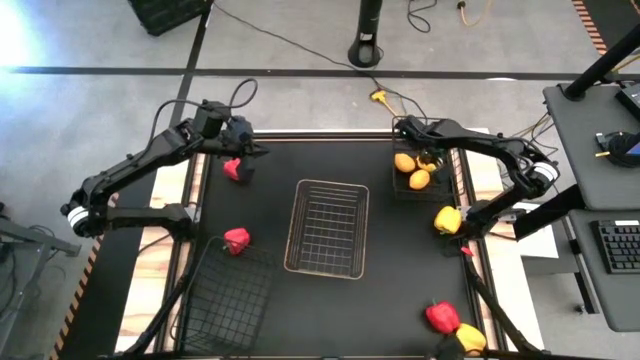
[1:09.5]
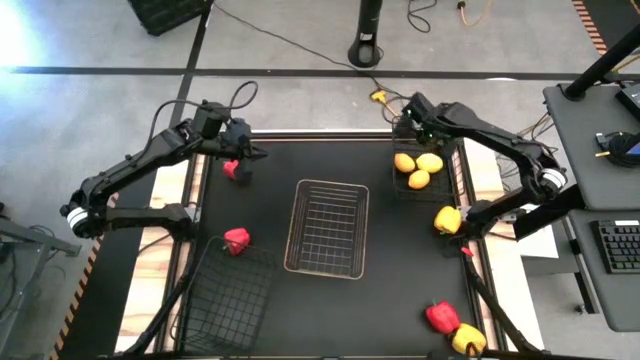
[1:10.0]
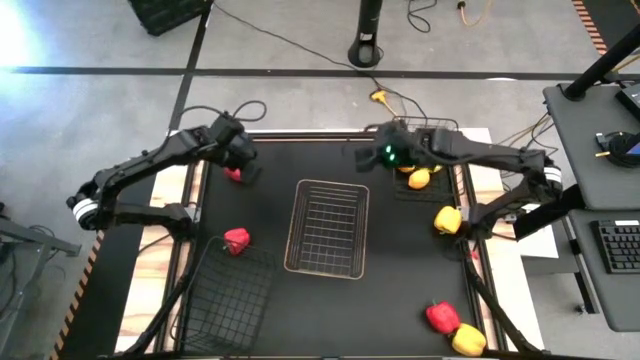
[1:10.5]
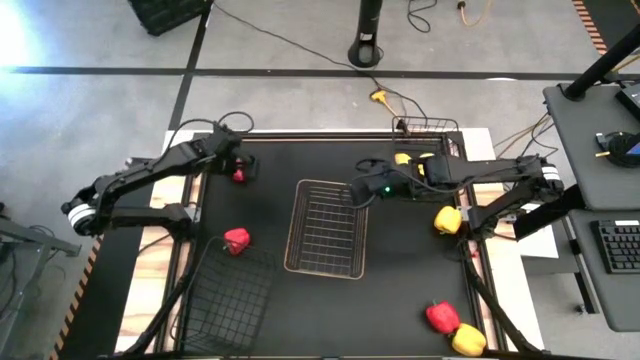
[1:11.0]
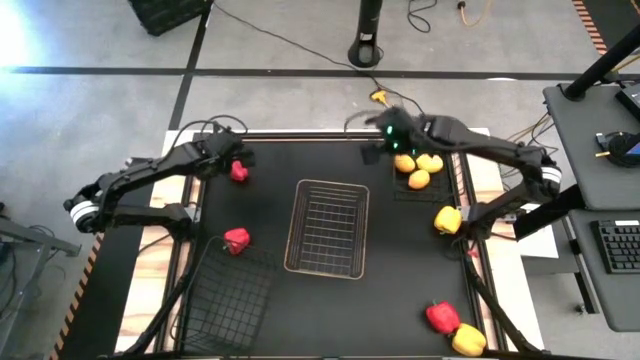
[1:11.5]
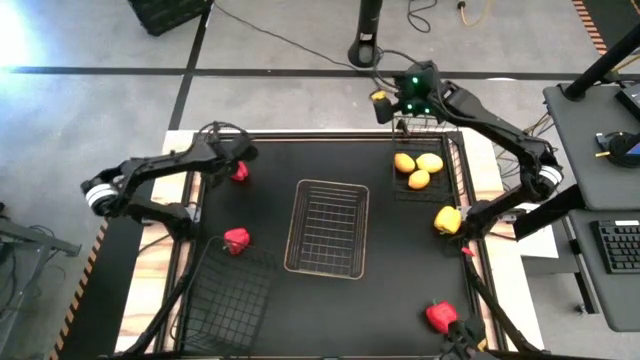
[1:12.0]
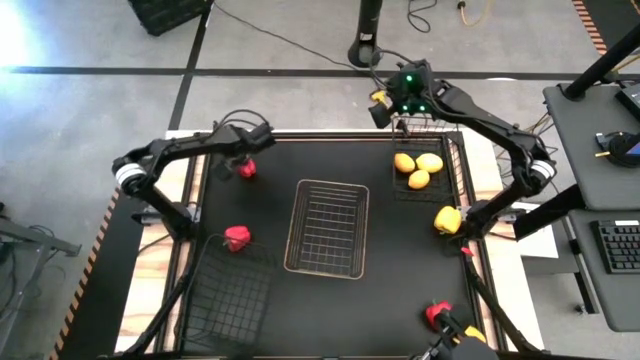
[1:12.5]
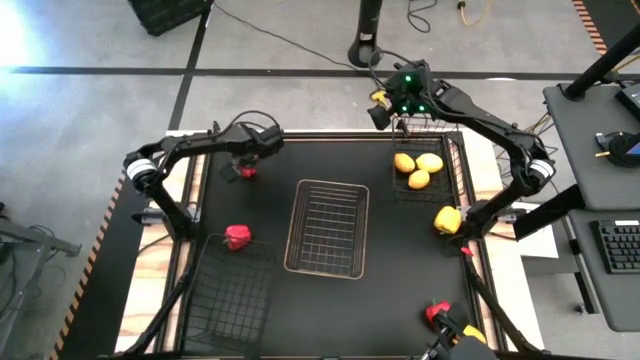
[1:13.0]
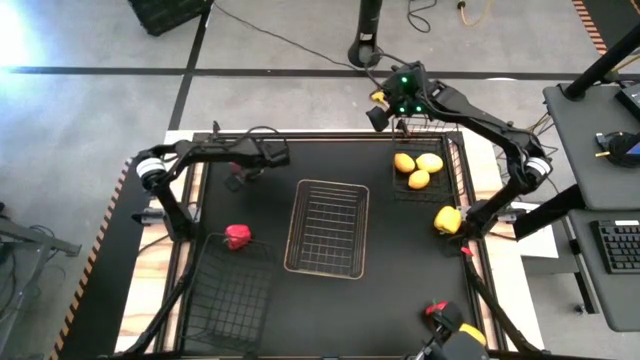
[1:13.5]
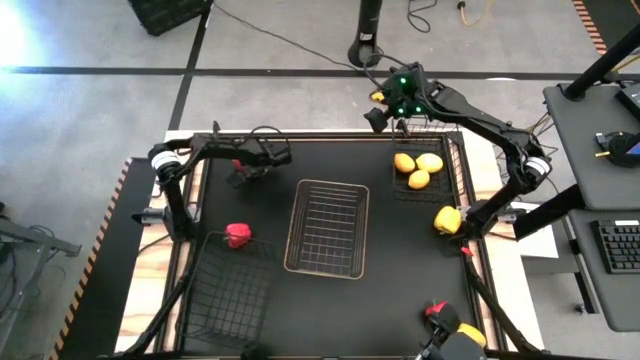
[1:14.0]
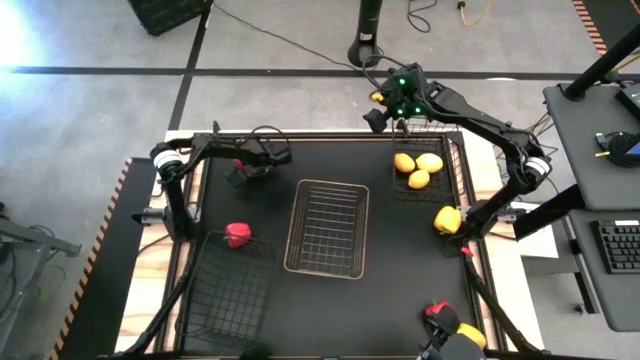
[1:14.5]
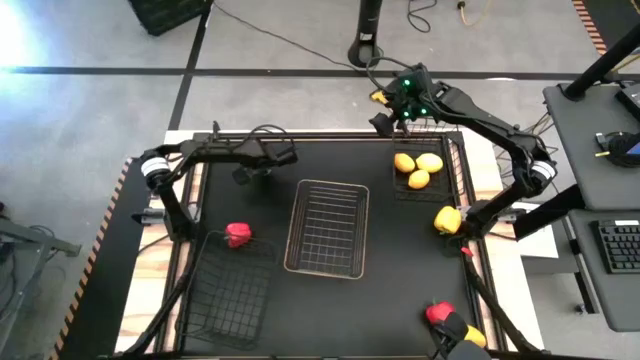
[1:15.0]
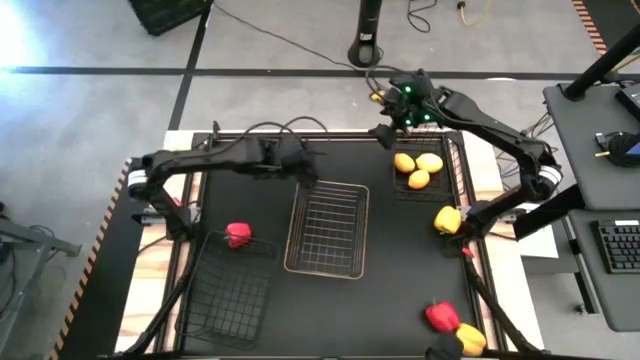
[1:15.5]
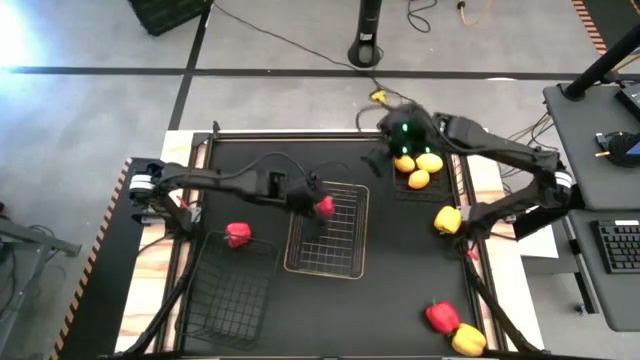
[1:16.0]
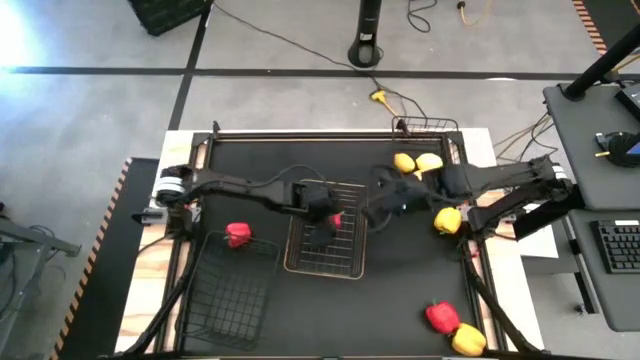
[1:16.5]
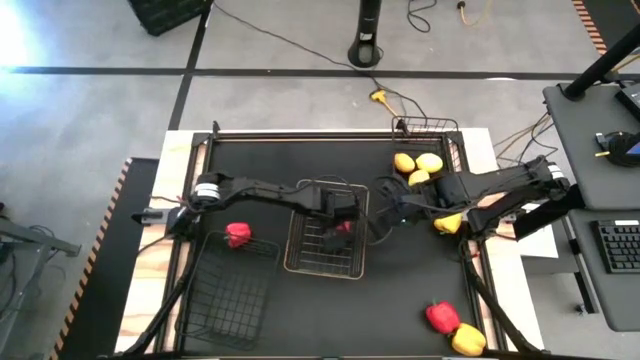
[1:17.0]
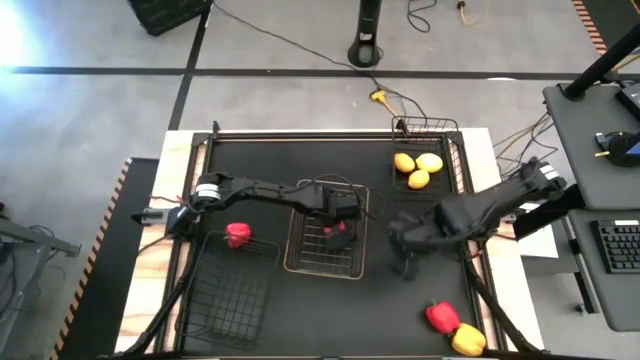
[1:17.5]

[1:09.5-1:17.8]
Task: Sort produce into baskets
Put the top left red bell pepper into the yellow wire basket

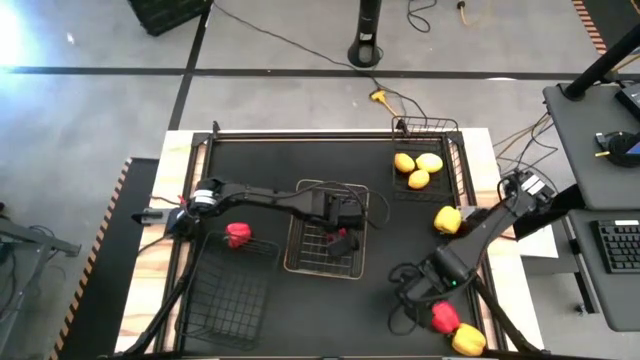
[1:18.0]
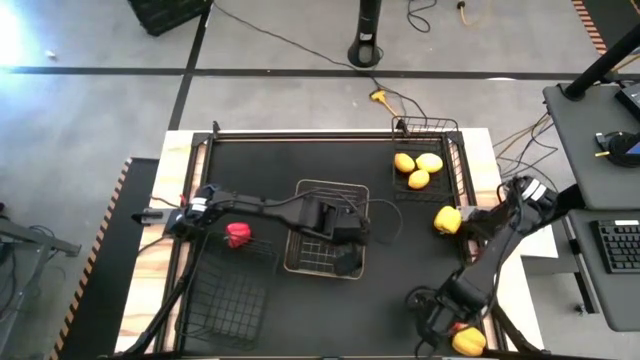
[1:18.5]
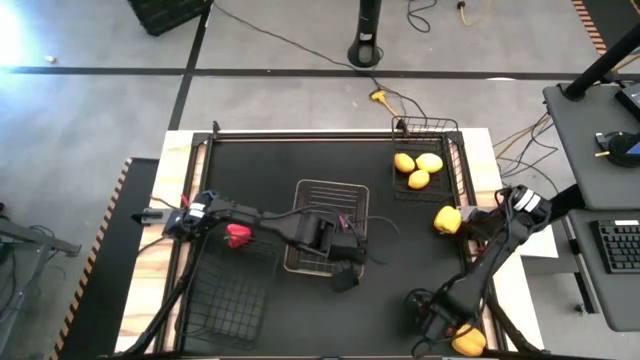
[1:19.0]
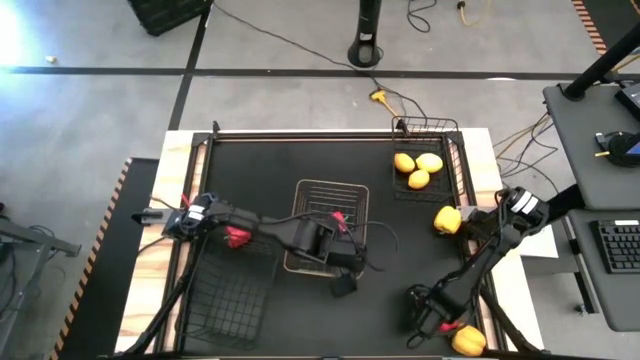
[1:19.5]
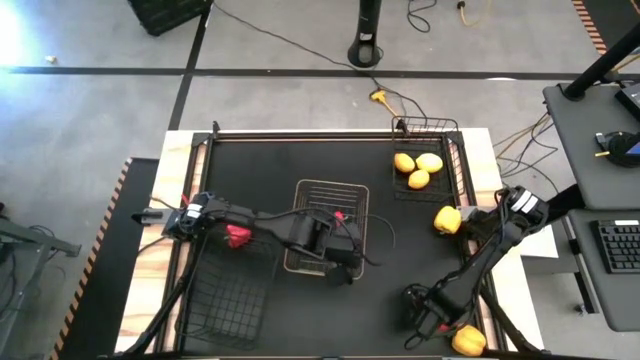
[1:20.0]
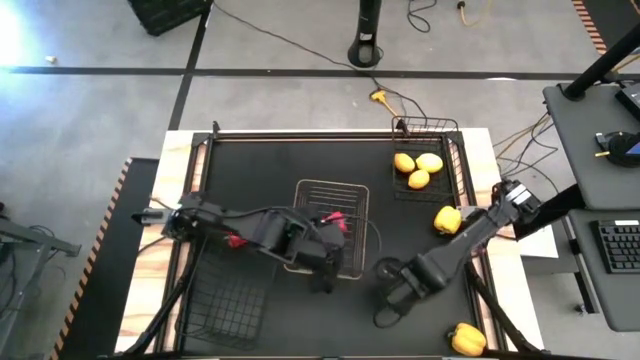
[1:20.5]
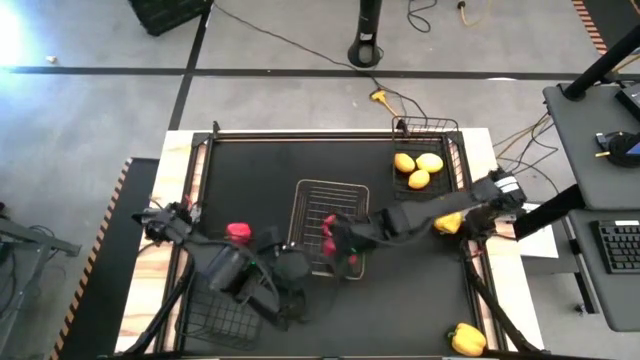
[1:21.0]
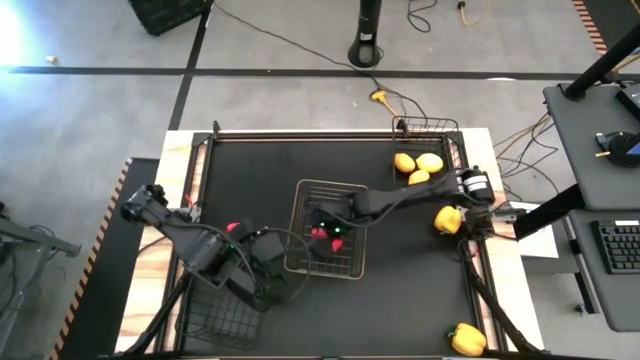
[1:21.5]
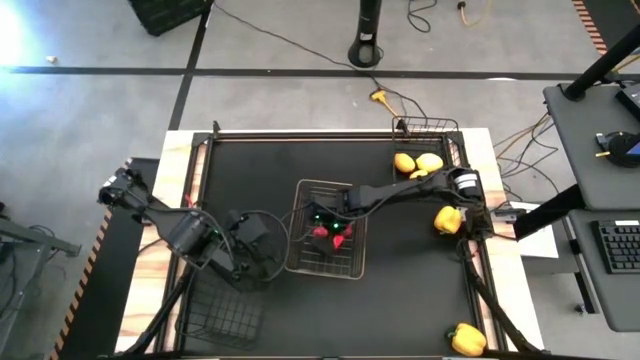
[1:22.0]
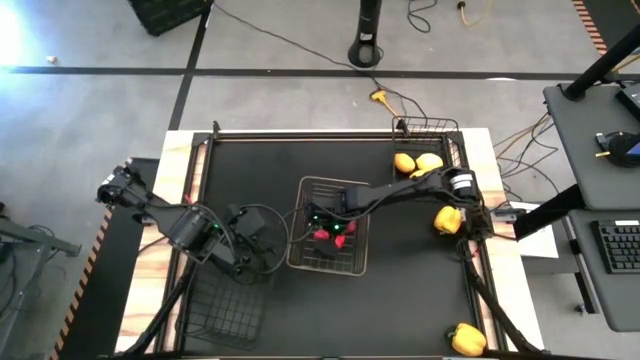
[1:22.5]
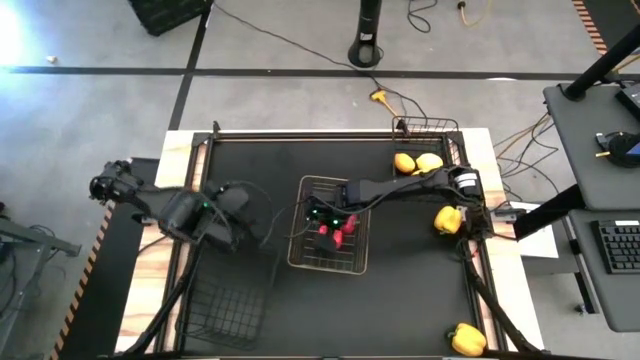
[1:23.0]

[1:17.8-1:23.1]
Put the bottom red bell pepper into the yellow wire basket

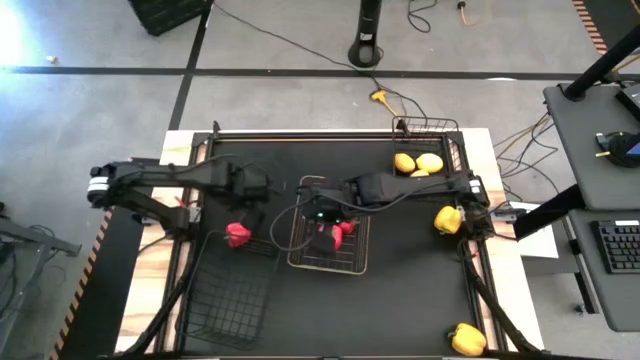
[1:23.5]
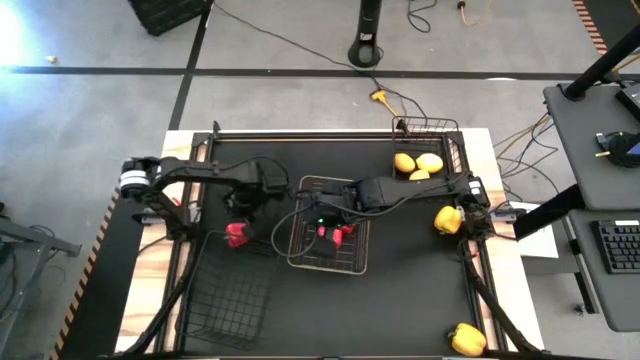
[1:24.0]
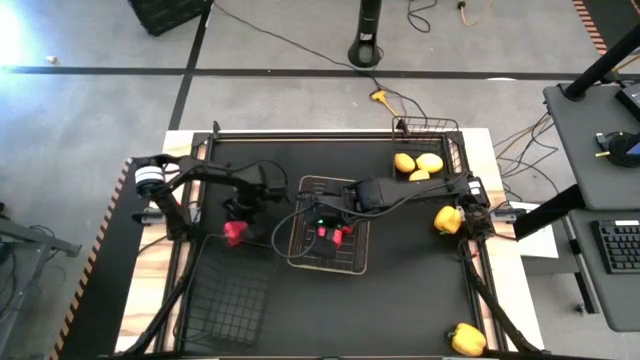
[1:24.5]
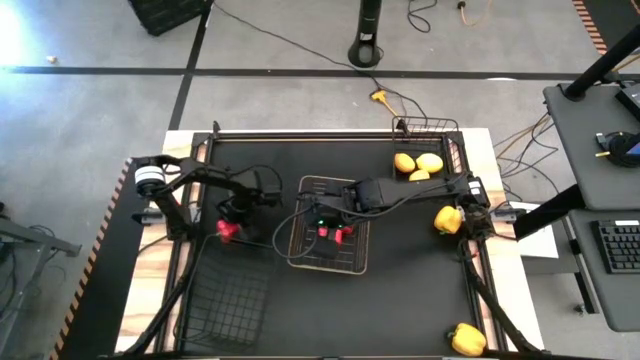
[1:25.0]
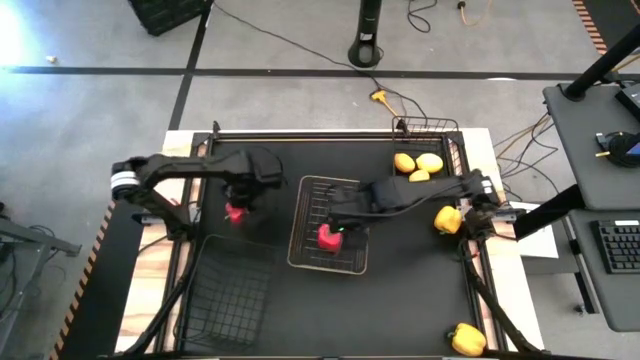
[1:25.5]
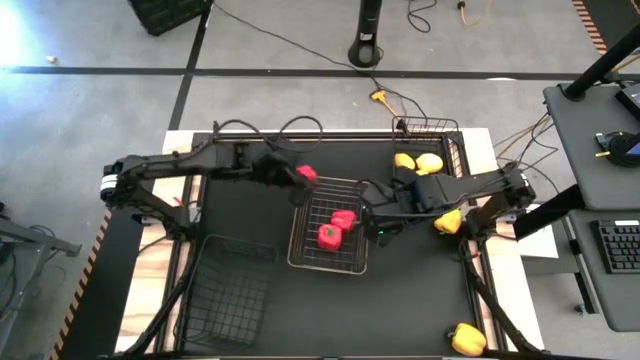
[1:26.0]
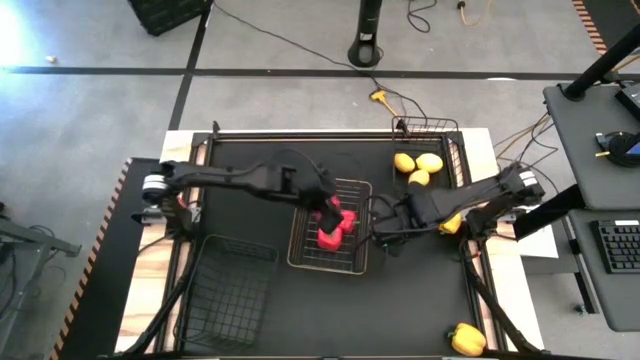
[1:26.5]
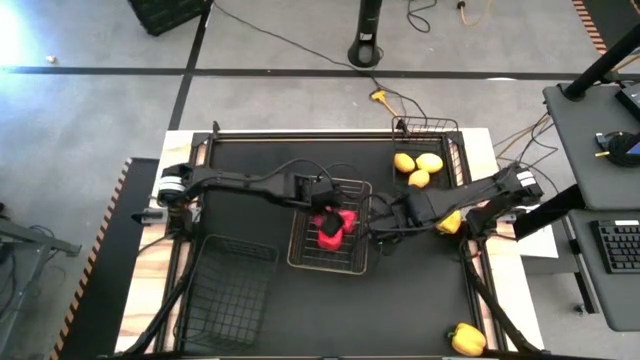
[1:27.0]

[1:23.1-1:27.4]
Put the red bell pepper into the yellow wire basket

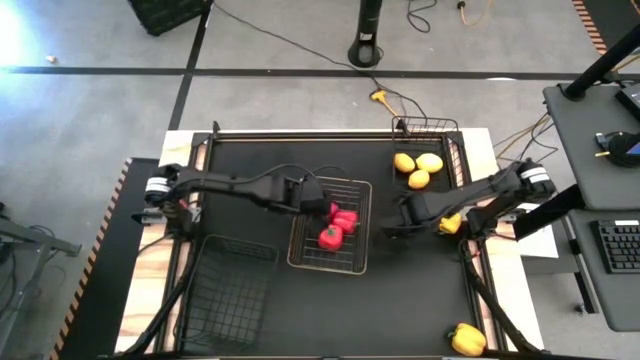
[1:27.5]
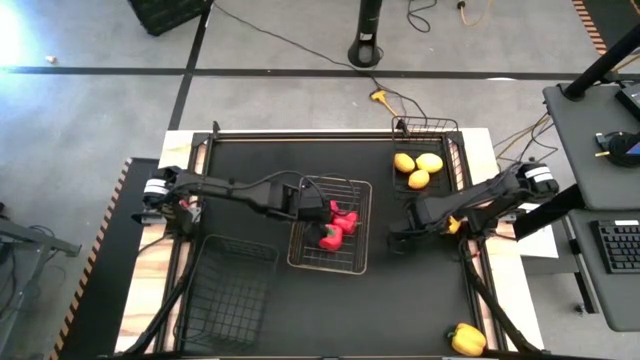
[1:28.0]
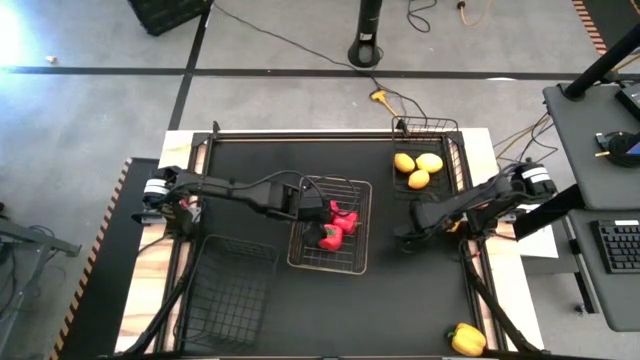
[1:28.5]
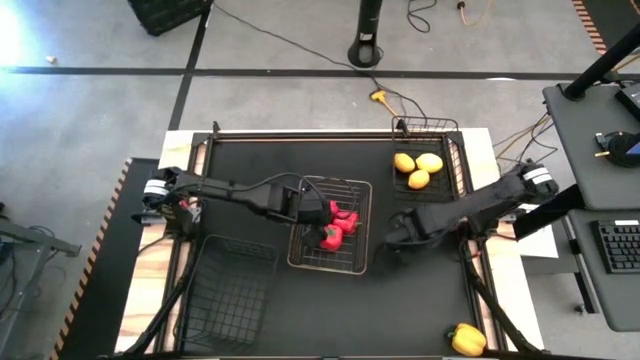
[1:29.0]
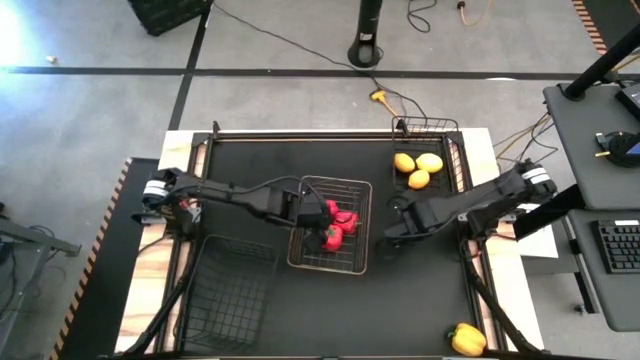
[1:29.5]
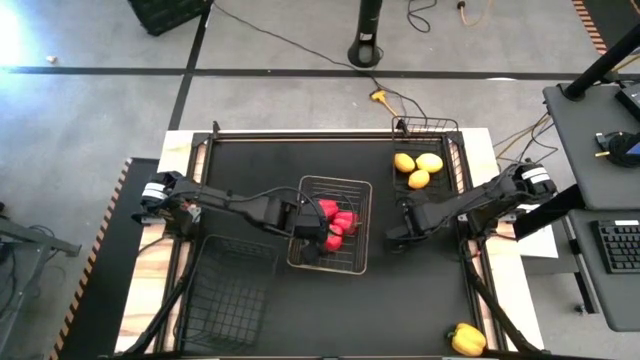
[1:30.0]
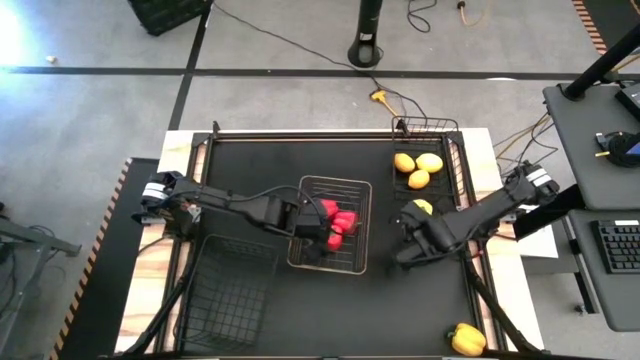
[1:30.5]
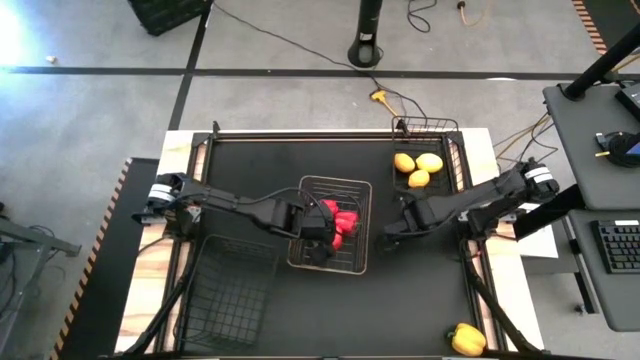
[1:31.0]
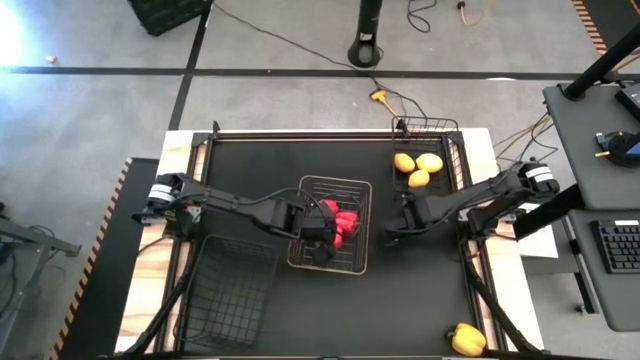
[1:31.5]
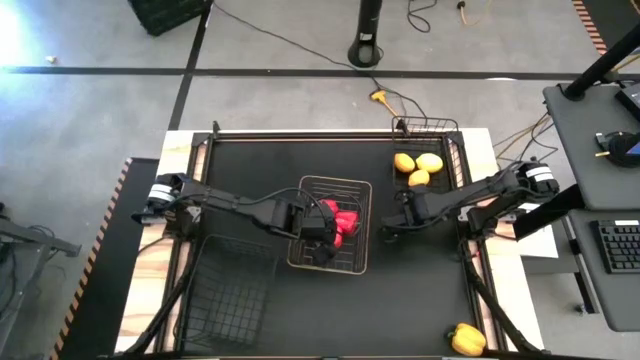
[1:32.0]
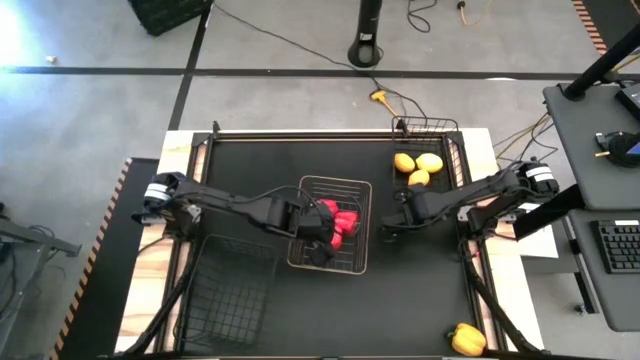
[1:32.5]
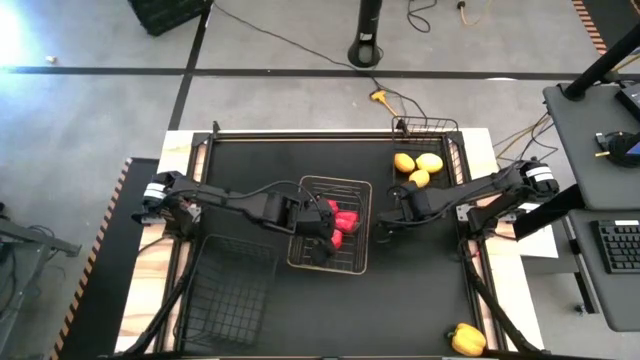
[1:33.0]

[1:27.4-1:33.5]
Put the top yellow bell pepper into the bottom black wire basket
